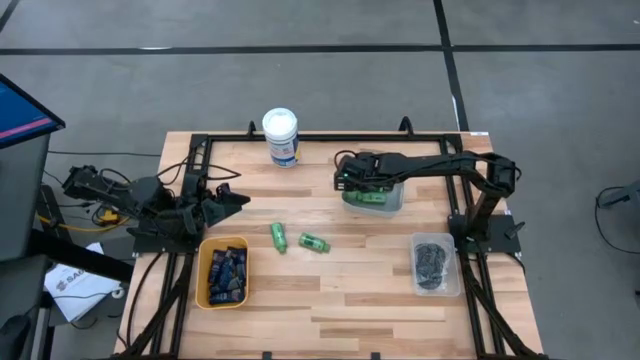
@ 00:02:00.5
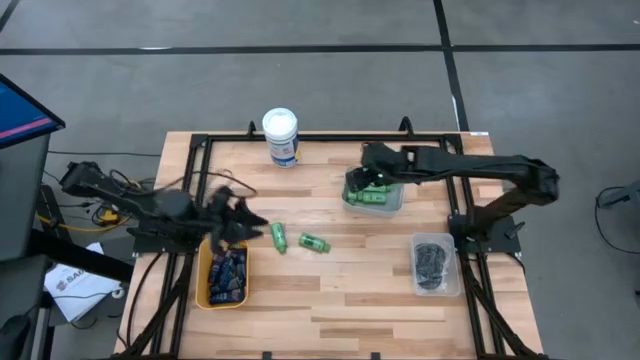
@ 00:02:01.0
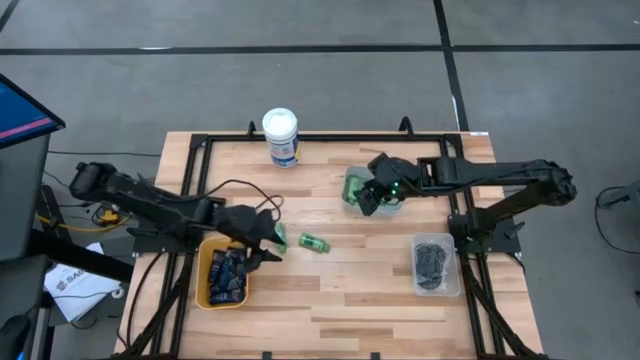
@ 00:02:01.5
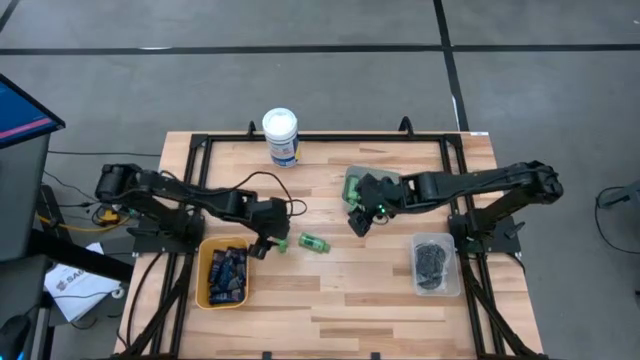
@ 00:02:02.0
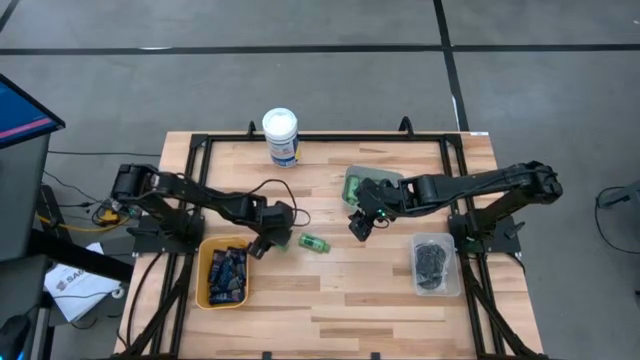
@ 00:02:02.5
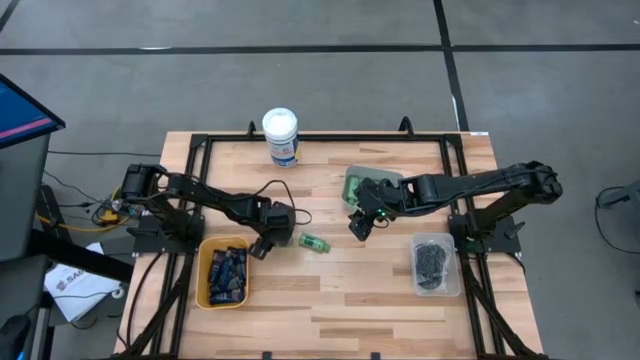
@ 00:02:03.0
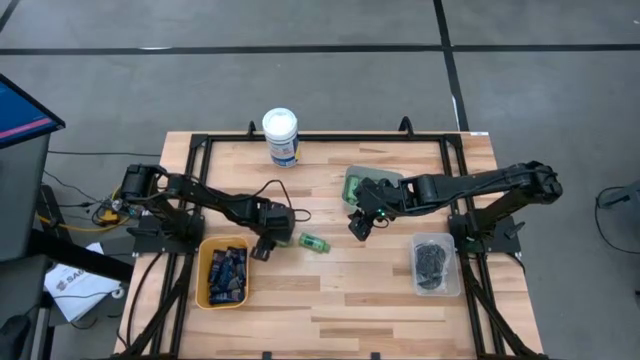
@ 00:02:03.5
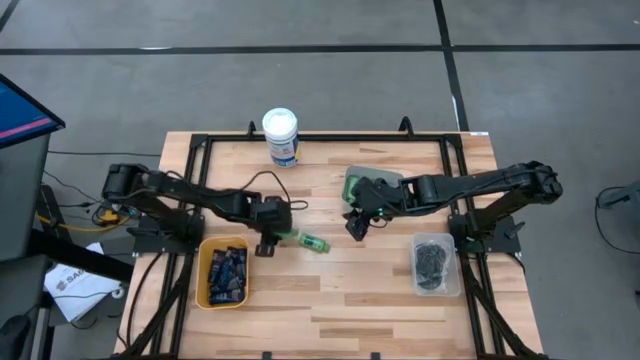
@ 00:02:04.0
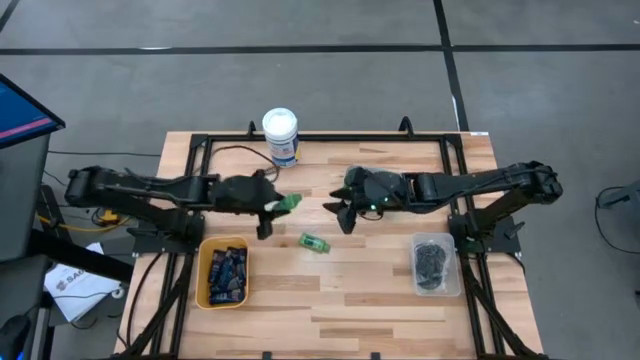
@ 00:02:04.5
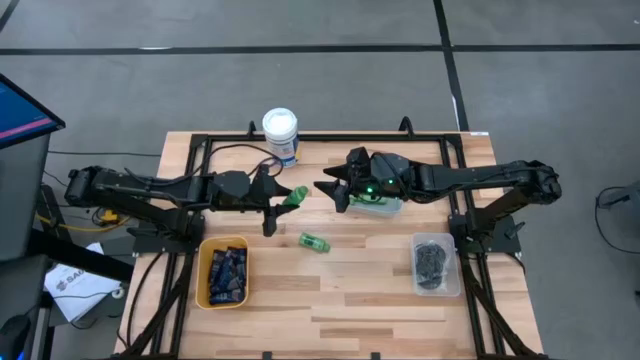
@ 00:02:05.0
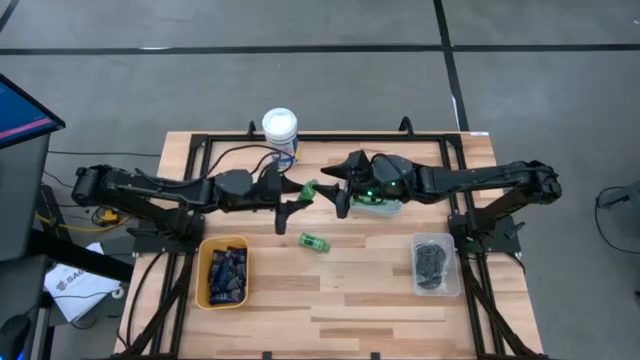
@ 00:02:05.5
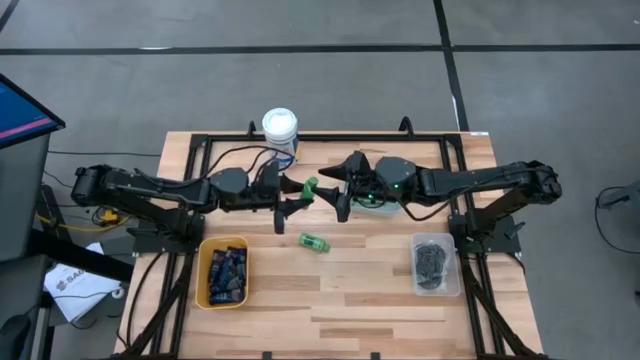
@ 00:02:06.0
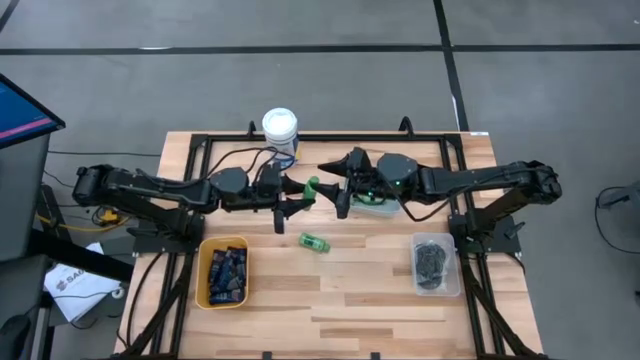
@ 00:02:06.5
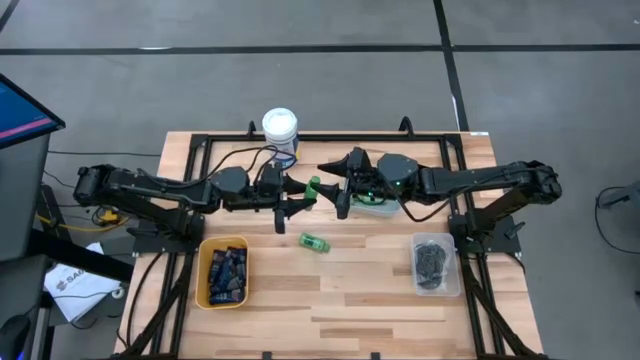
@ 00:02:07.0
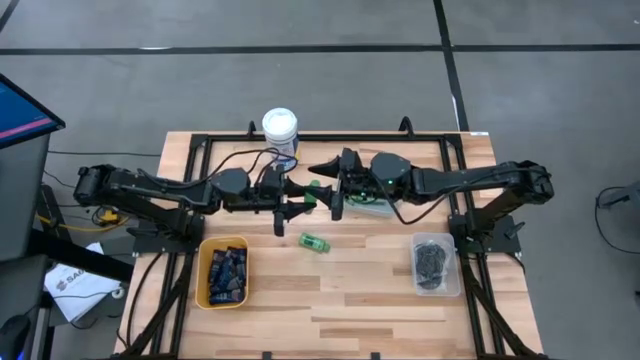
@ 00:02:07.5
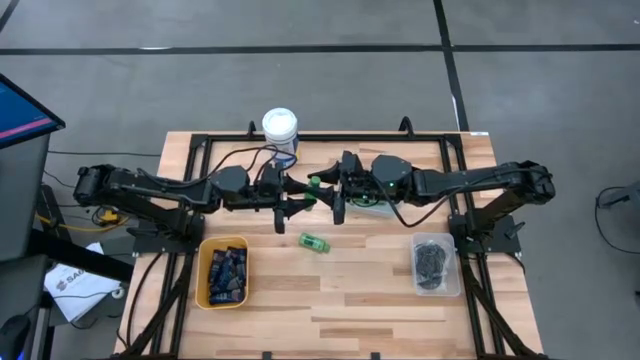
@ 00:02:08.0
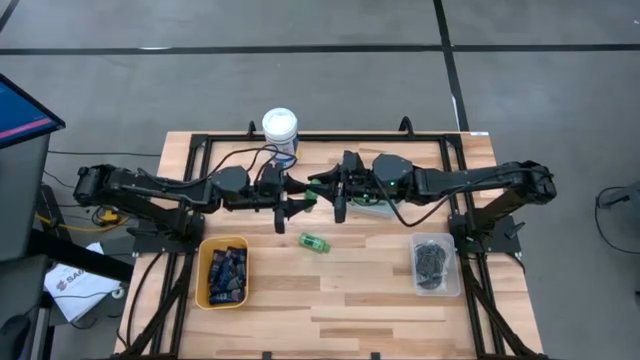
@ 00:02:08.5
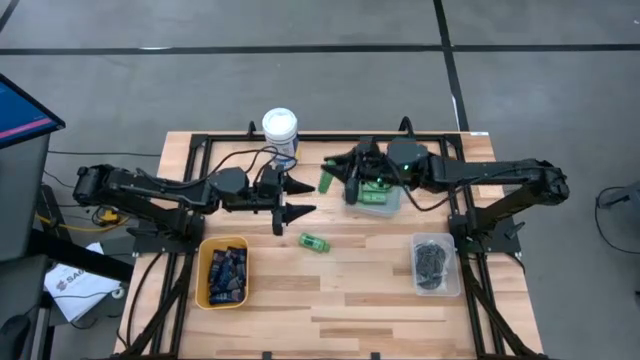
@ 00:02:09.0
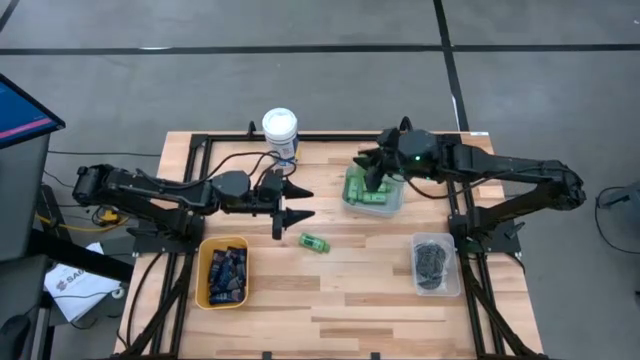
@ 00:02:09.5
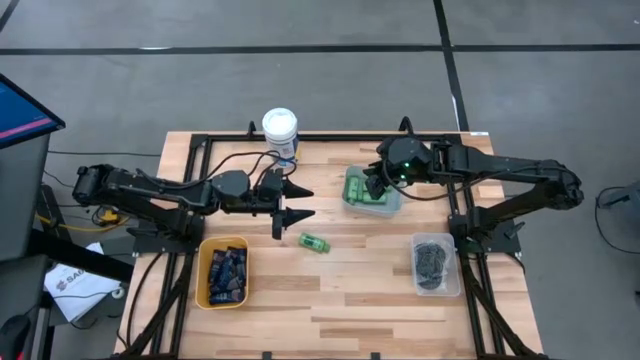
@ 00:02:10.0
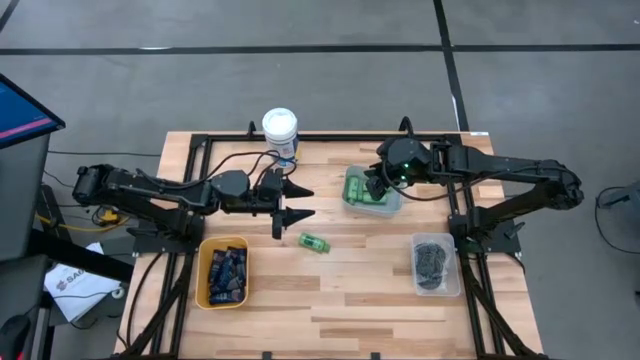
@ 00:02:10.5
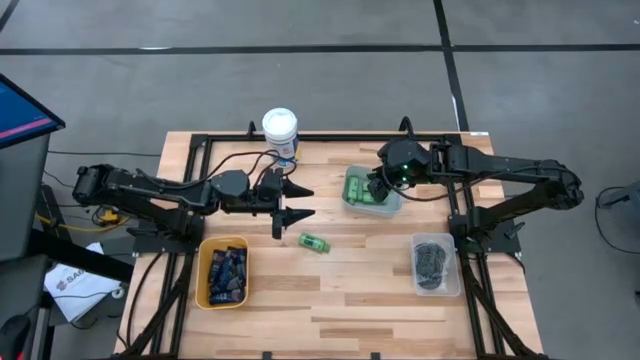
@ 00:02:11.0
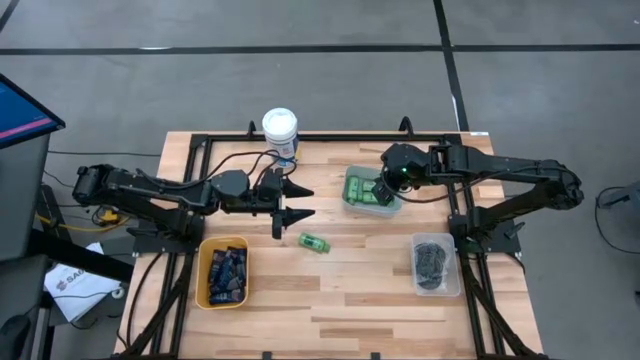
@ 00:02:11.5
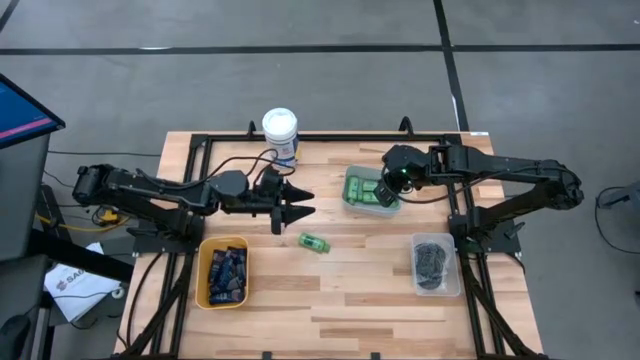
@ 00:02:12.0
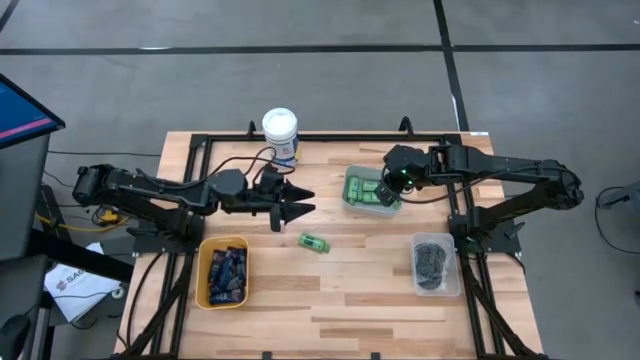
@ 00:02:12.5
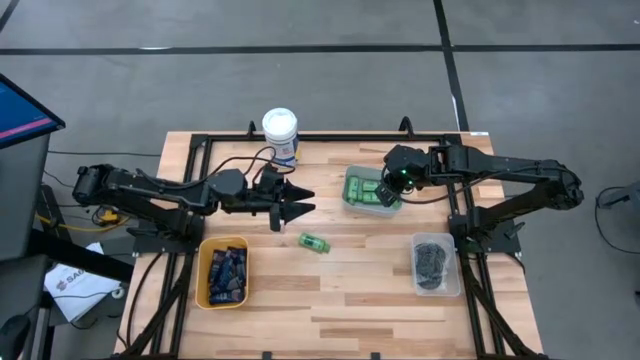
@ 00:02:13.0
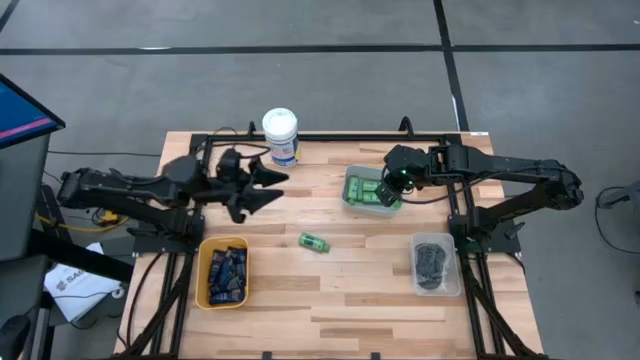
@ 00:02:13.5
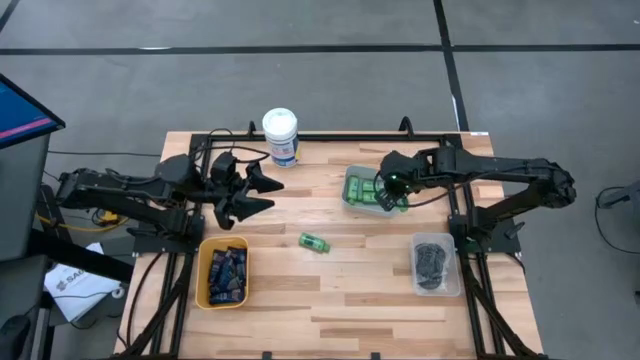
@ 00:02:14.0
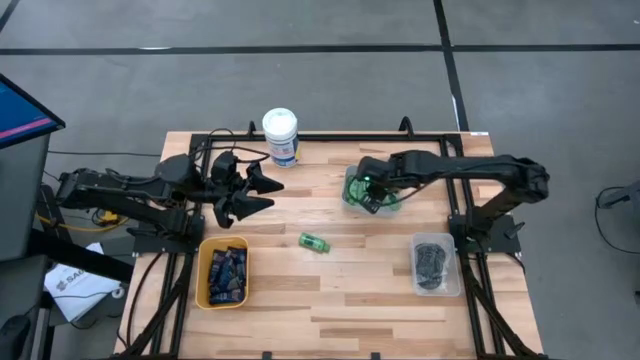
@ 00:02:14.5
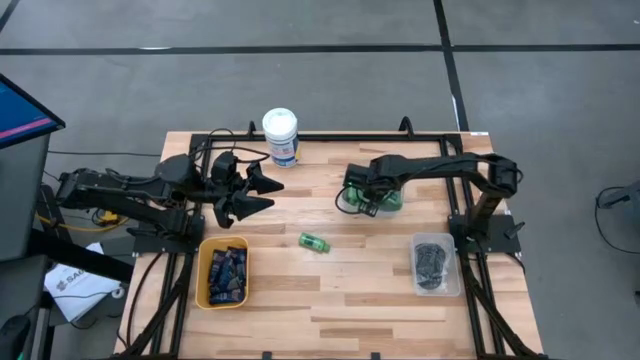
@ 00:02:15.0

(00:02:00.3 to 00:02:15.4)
Task: Pick & Place Travel size toiletries
Put the green shampoo into the gray bin

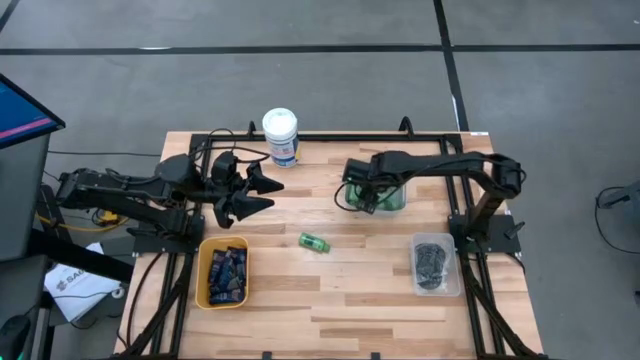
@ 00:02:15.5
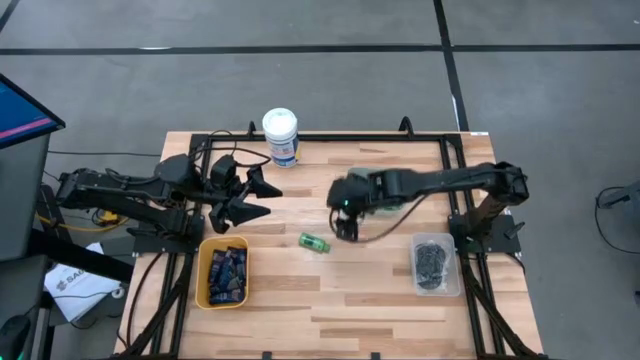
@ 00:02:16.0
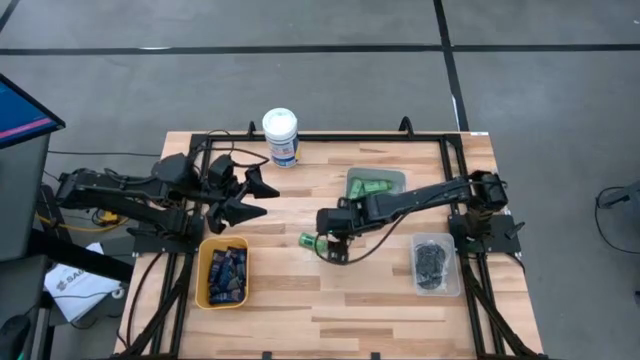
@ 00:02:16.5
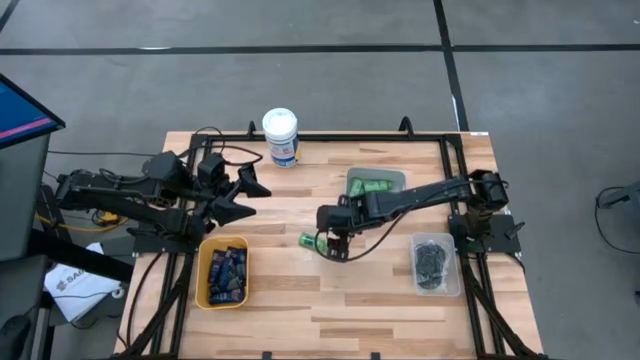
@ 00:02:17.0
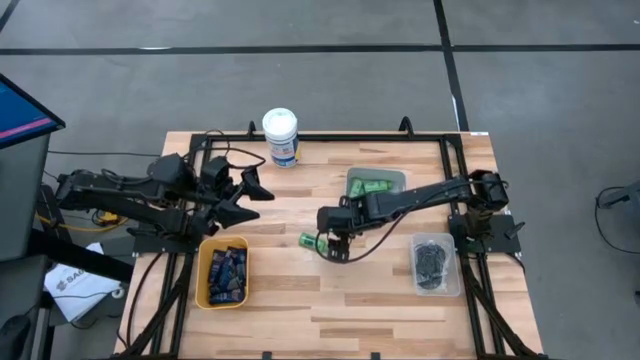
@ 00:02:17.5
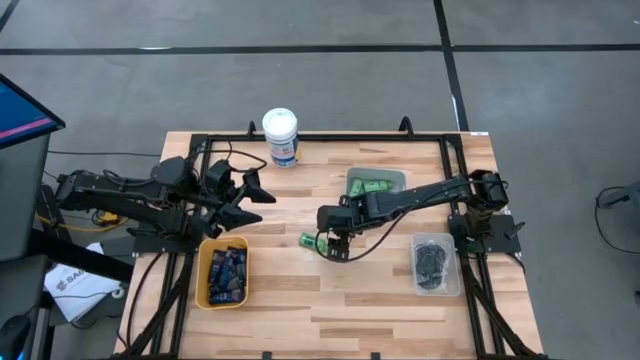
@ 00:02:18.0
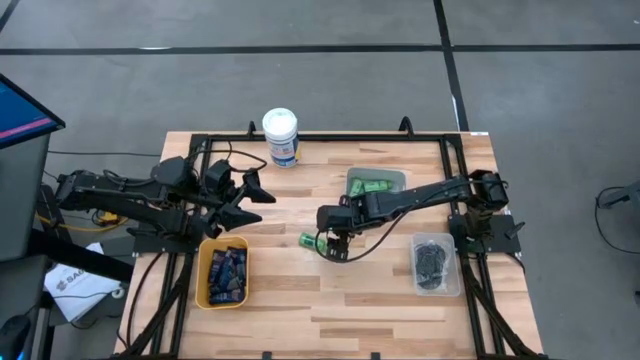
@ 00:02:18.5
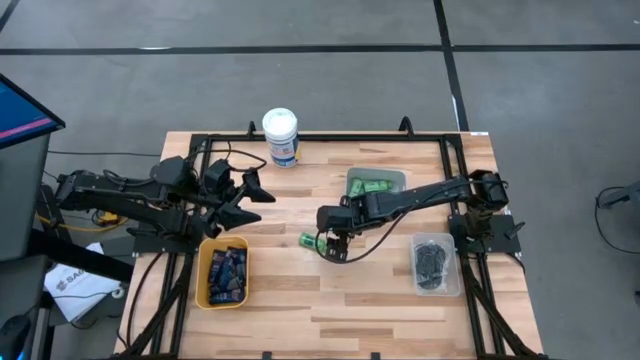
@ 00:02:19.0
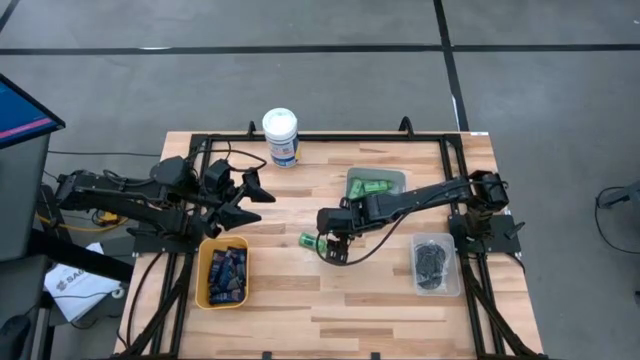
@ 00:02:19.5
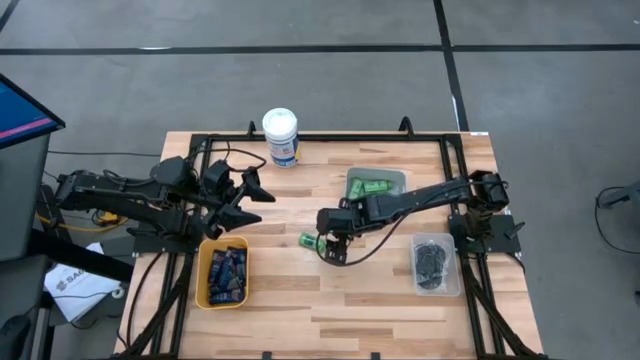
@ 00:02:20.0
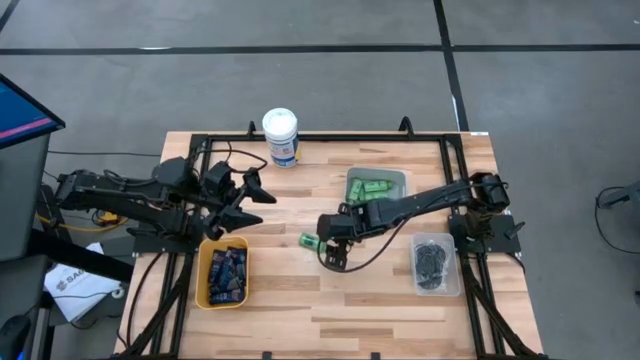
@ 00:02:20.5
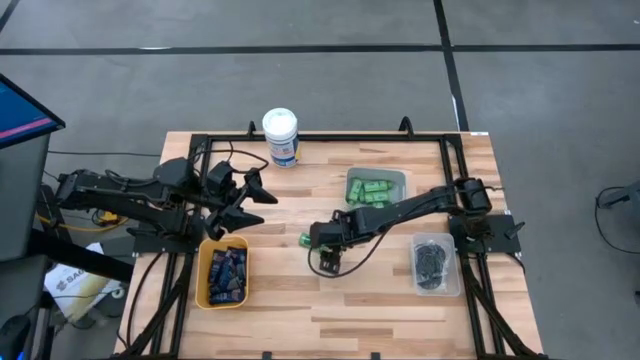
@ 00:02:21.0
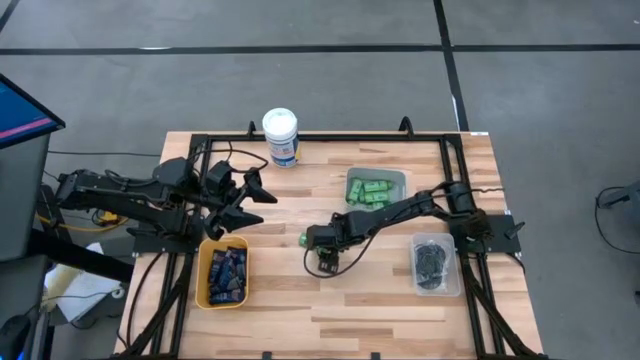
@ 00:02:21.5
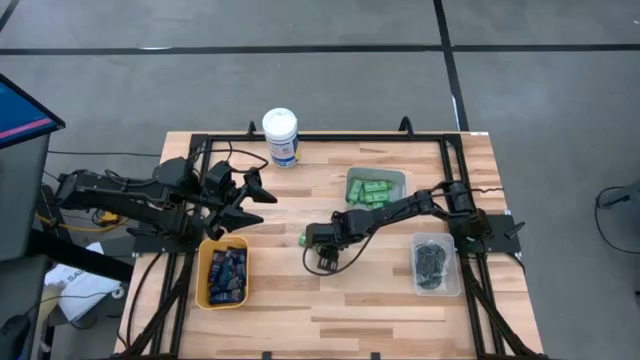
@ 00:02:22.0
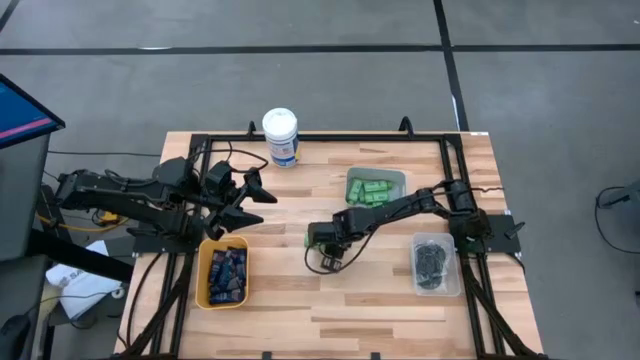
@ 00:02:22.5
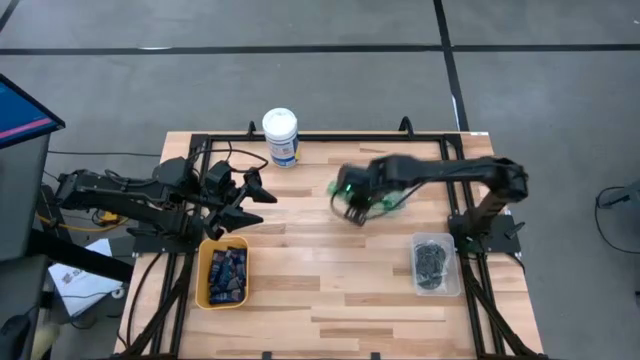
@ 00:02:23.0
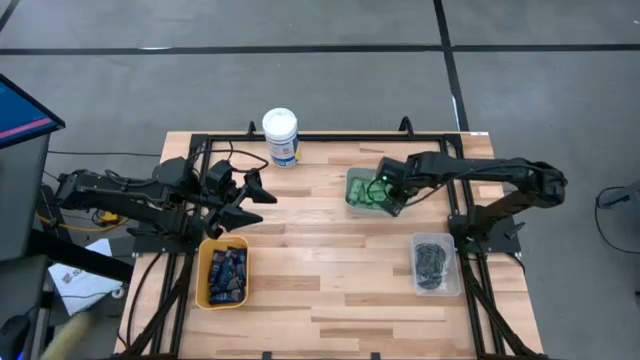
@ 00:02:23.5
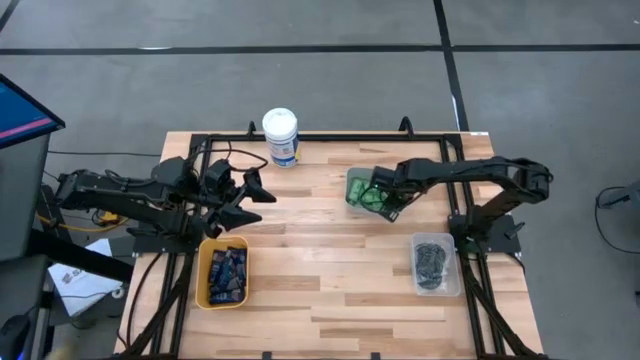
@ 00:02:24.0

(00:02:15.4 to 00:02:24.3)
Put the green shampoo into the gray bin
